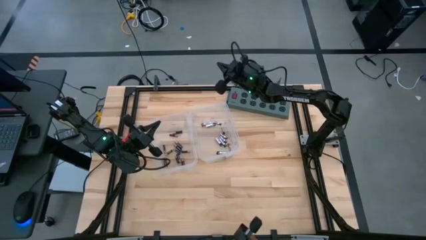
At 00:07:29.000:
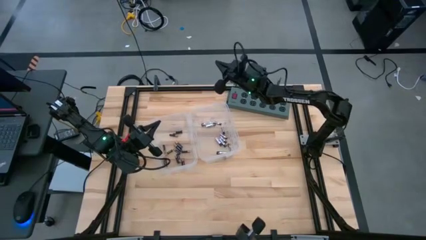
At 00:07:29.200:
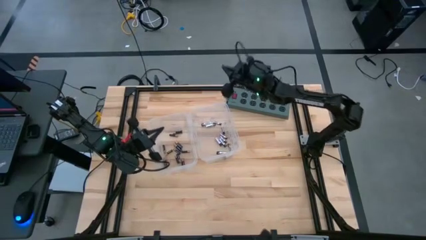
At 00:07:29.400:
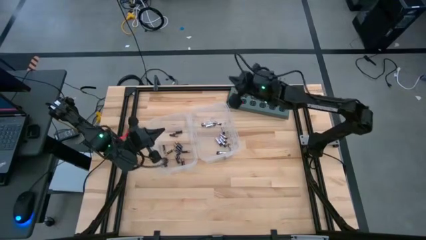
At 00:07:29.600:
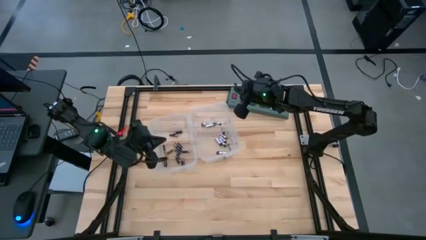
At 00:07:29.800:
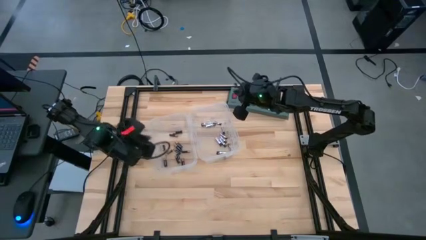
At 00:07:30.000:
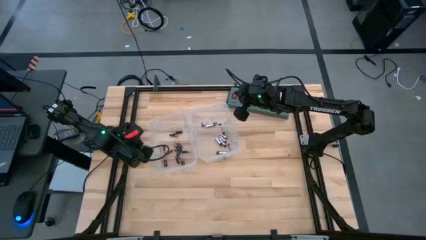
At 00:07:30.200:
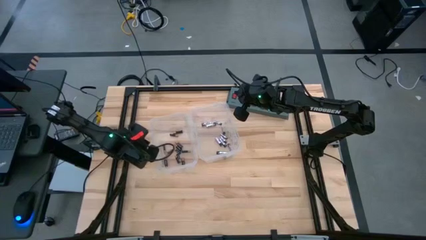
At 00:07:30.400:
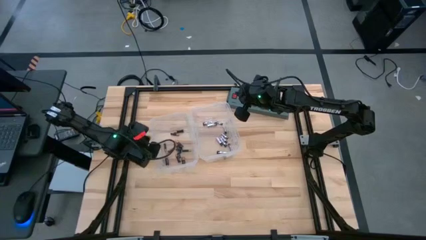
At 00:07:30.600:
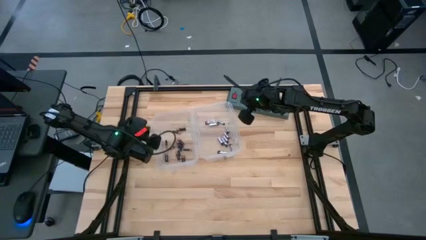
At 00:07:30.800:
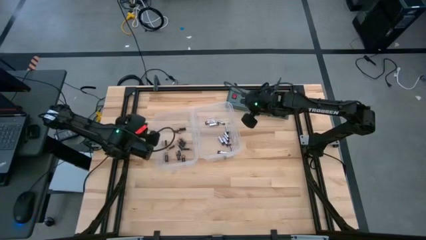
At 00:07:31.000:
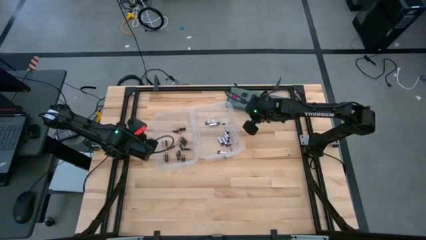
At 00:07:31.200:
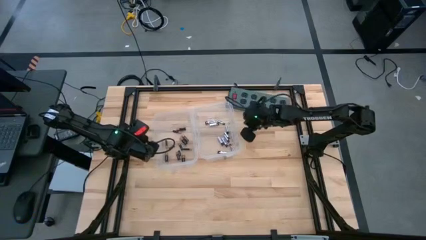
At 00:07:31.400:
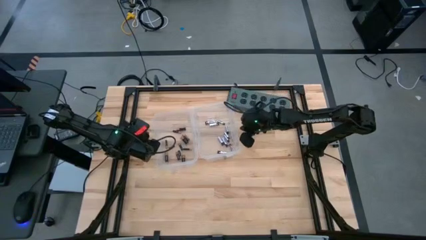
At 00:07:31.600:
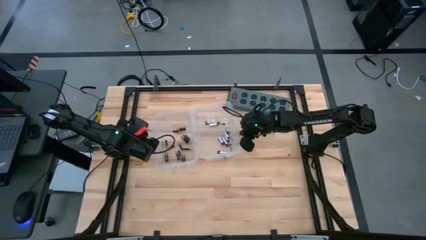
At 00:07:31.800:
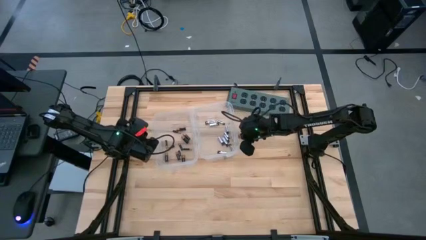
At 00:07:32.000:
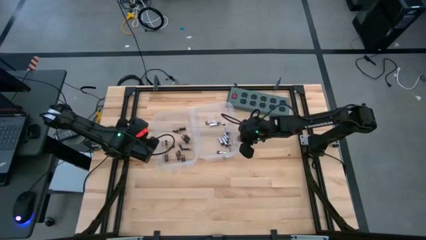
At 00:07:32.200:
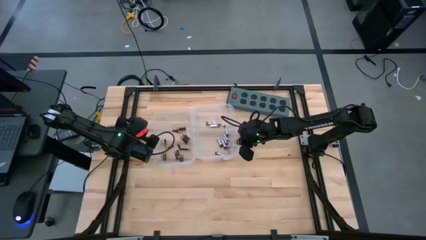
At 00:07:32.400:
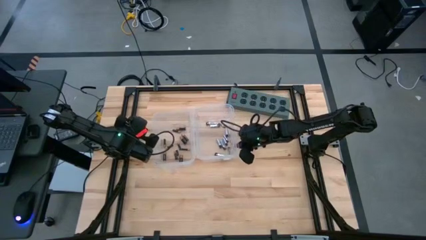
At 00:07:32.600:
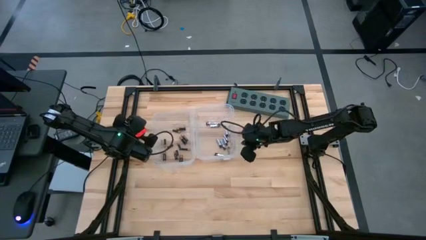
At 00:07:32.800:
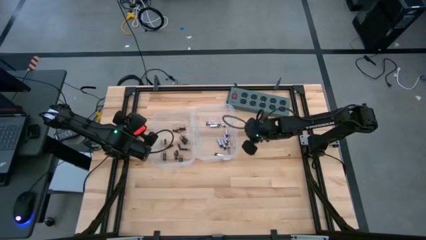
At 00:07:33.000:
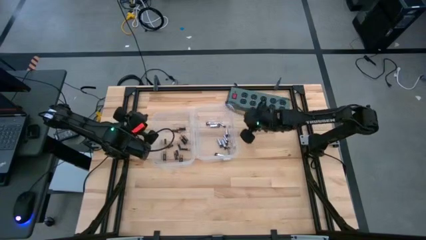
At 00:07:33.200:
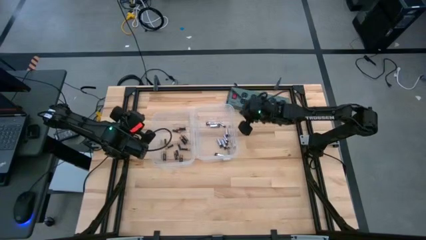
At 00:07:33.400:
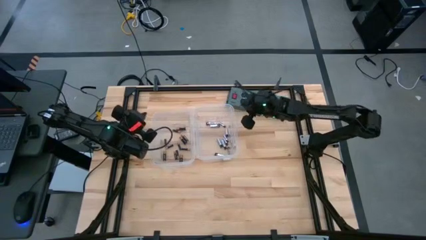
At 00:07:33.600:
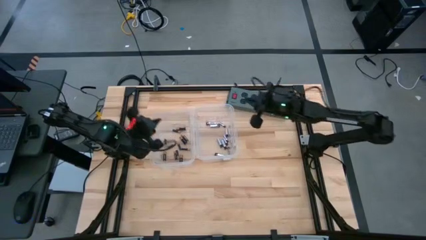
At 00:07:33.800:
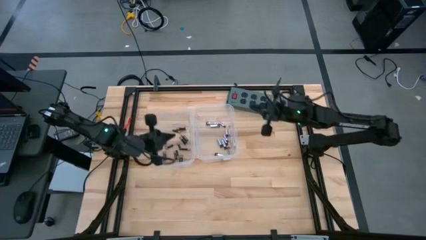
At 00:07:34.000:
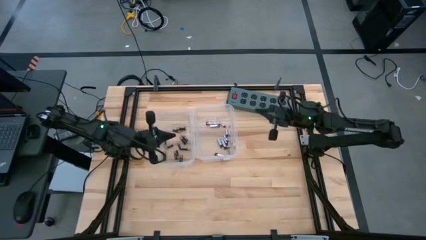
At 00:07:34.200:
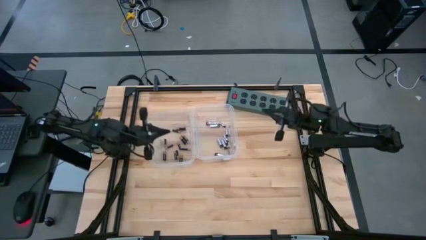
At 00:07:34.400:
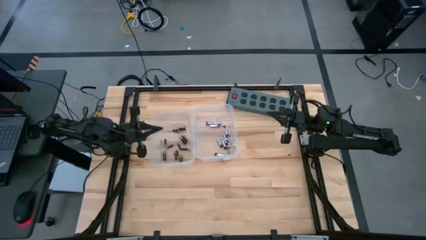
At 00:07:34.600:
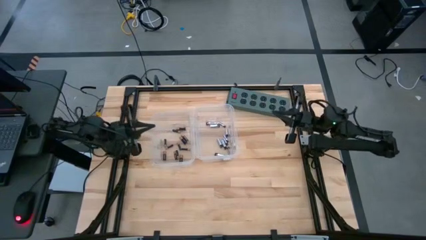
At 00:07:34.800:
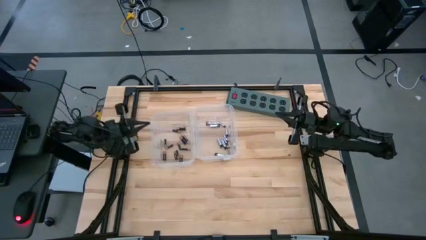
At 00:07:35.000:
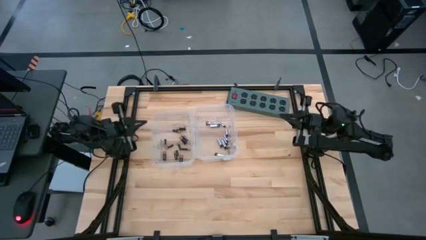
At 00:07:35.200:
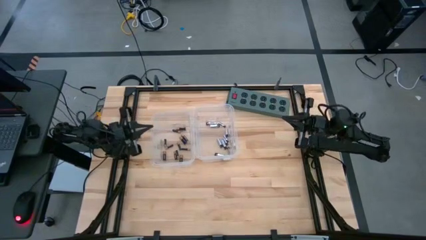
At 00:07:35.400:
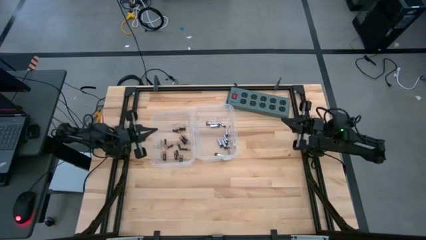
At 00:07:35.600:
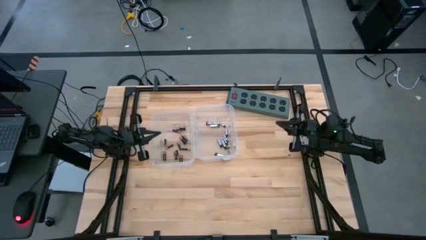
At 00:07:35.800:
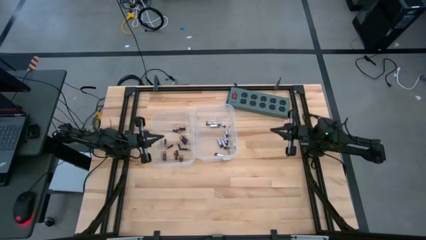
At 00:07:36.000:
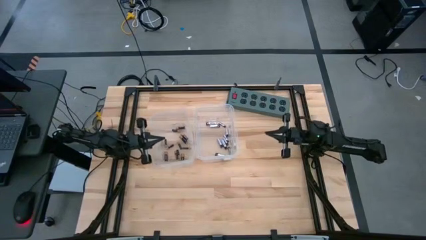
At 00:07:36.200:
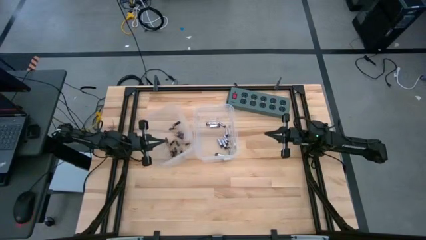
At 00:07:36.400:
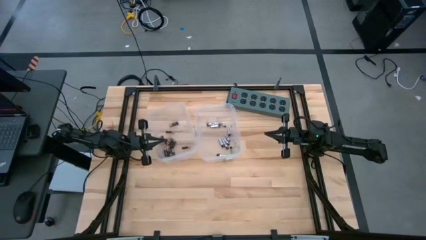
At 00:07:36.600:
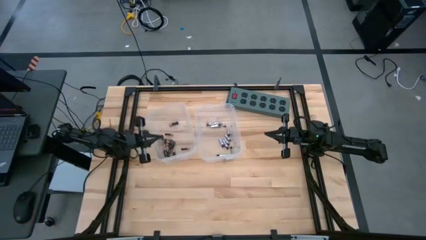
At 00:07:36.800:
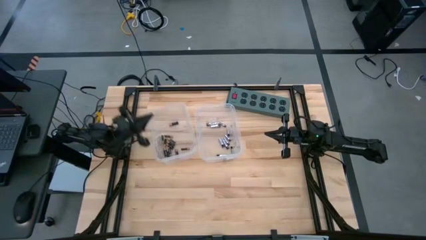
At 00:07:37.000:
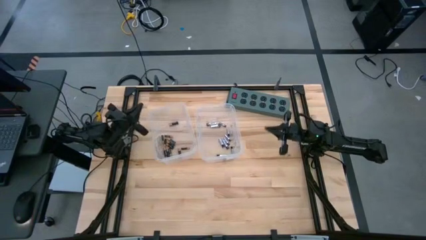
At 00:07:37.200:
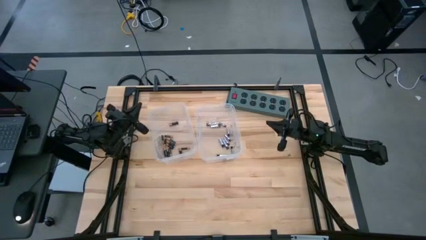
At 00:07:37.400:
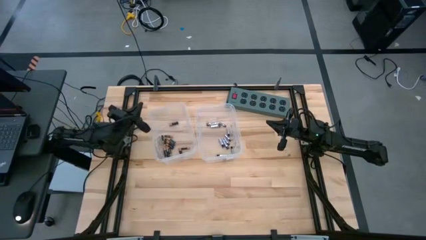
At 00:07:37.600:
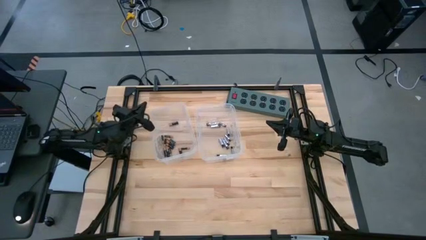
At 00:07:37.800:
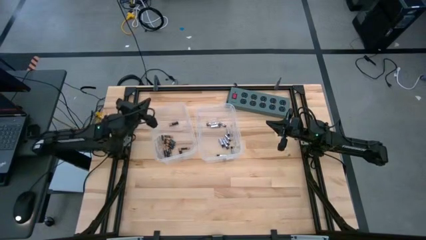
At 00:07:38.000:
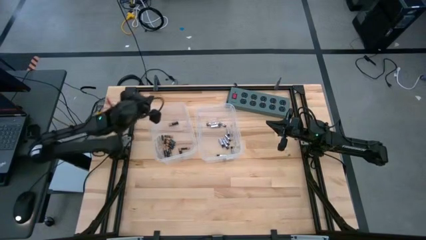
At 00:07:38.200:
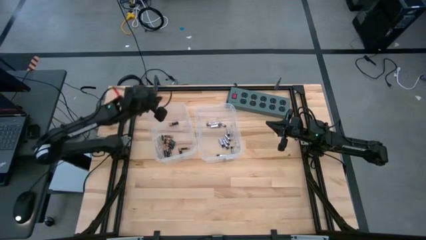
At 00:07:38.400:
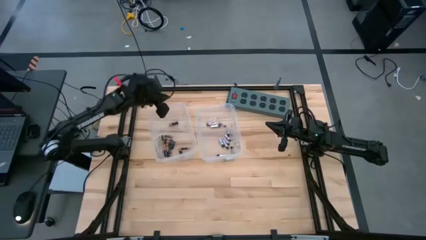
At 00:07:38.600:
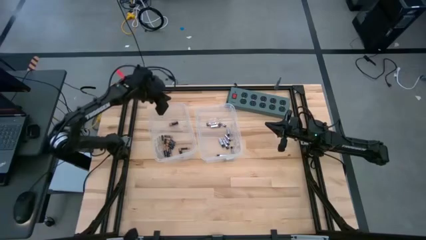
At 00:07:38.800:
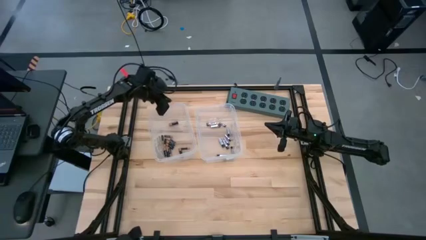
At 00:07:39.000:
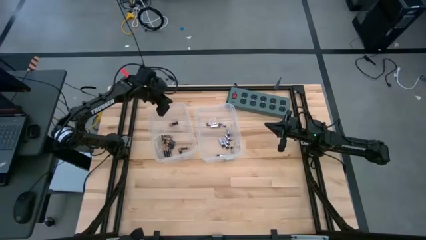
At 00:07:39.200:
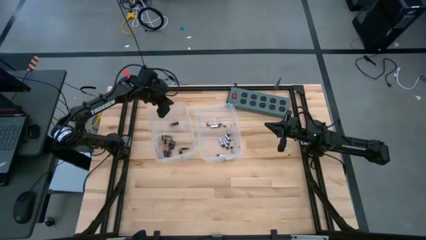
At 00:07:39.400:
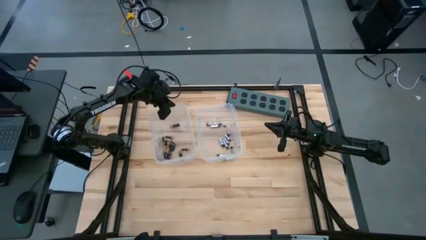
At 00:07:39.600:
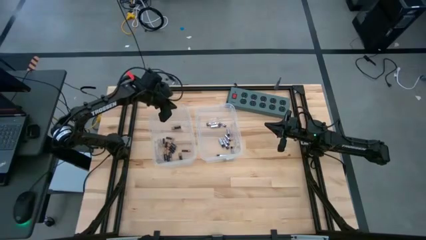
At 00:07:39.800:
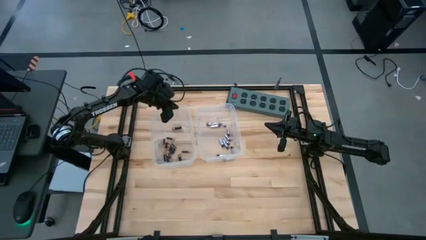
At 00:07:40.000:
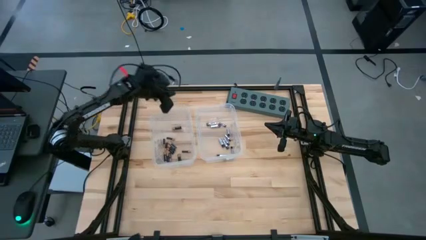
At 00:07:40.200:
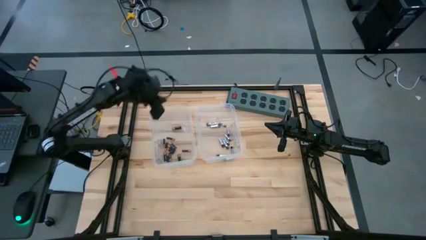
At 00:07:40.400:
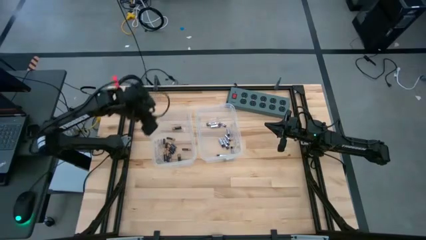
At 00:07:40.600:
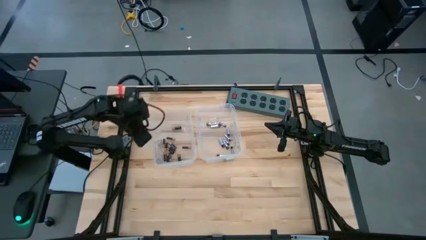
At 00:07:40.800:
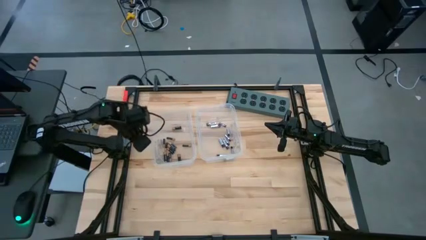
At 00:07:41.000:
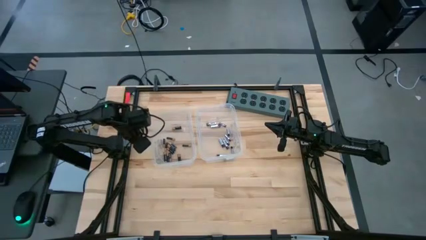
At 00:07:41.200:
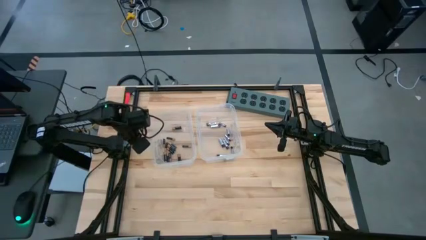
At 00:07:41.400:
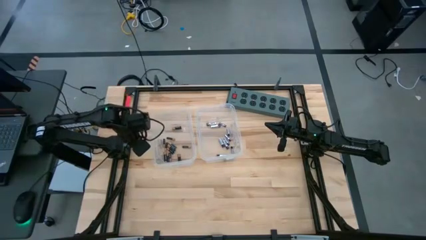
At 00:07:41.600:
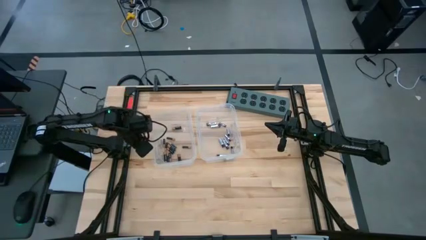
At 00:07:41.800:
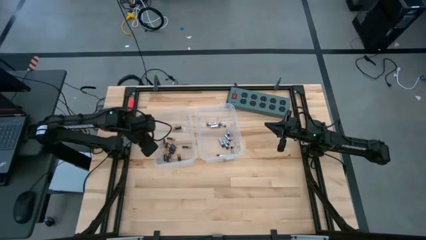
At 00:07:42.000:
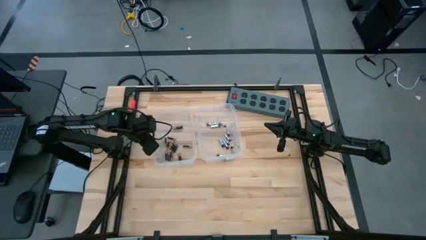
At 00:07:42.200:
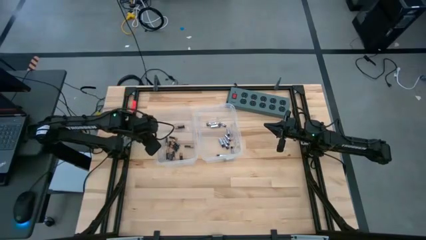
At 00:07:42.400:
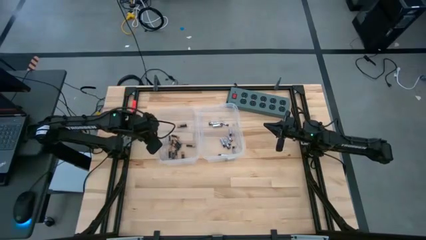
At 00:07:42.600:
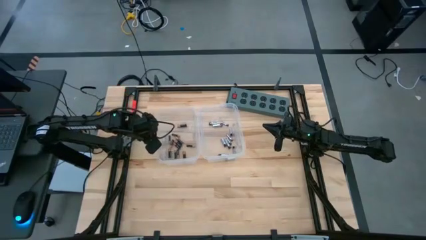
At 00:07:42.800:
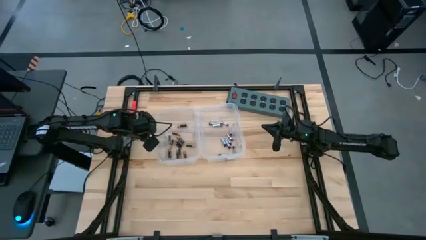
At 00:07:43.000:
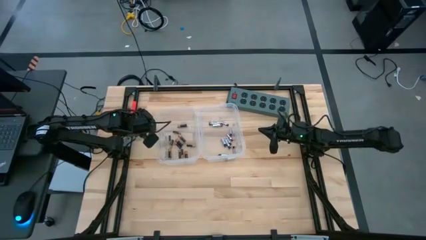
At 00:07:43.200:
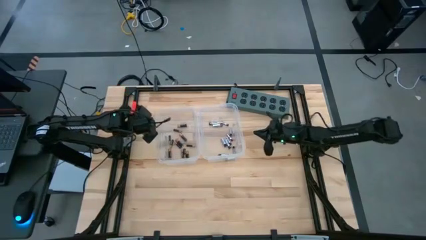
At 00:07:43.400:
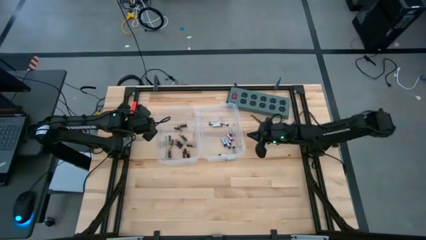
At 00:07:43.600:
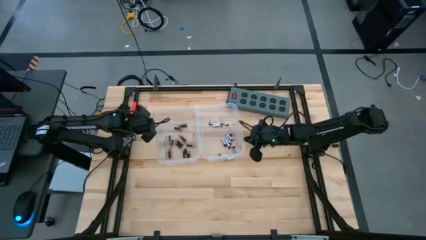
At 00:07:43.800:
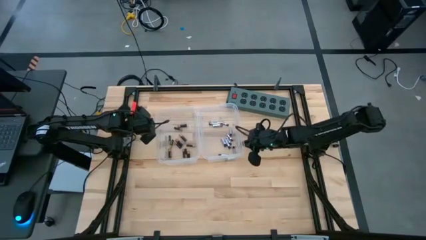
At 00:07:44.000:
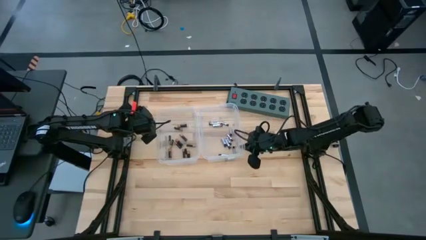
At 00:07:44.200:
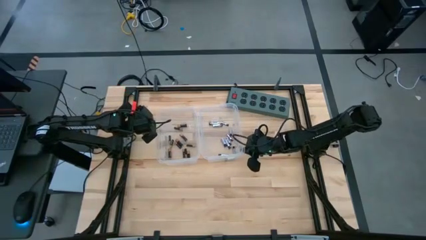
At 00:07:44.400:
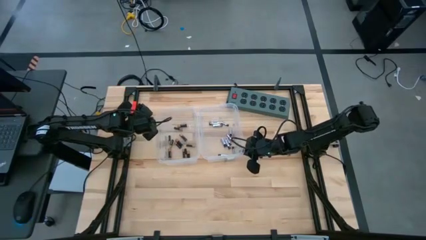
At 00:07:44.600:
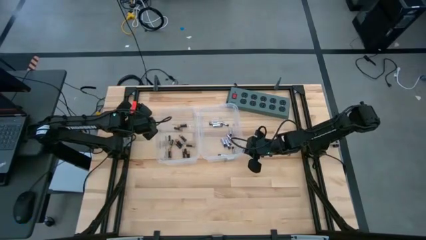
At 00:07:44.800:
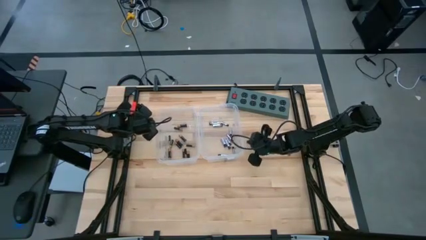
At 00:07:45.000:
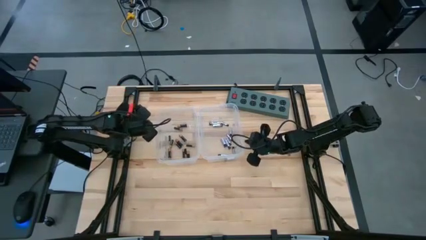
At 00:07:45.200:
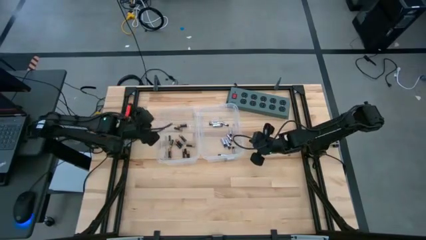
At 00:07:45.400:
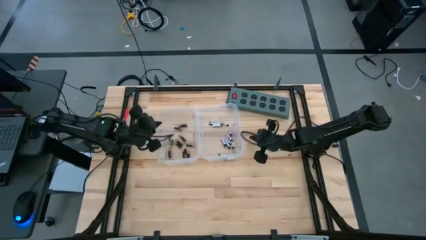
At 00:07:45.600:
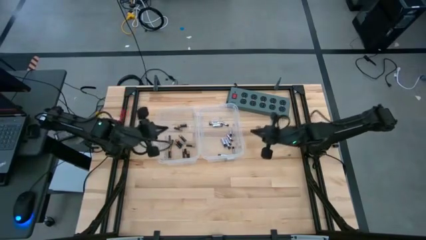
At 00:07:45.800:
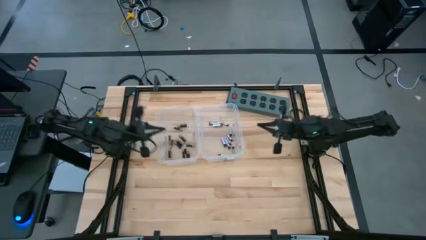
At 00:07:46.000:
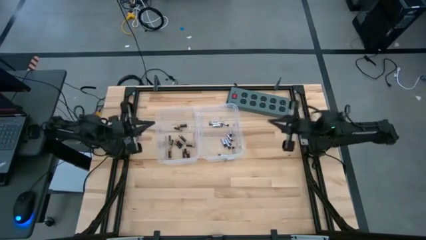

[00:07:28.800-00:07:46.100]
Task: Sort batteries
Adjust the transparent bins
